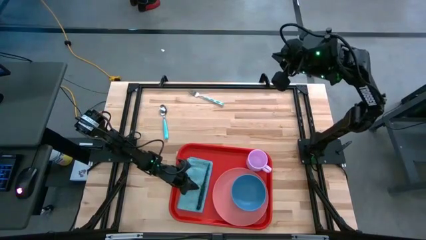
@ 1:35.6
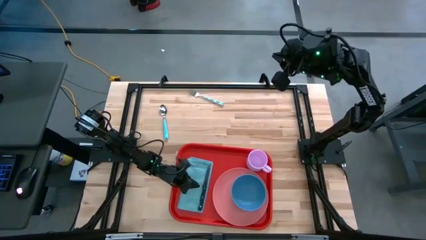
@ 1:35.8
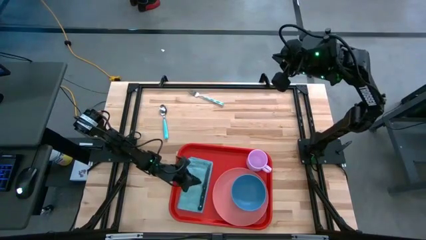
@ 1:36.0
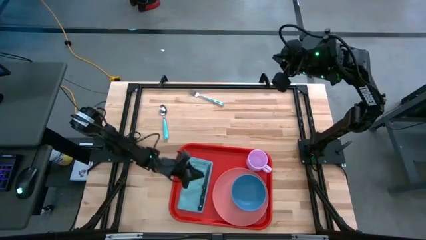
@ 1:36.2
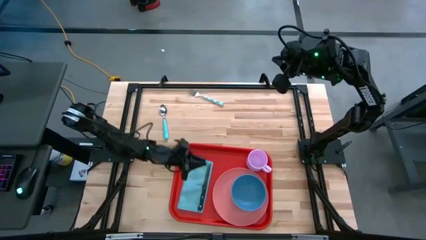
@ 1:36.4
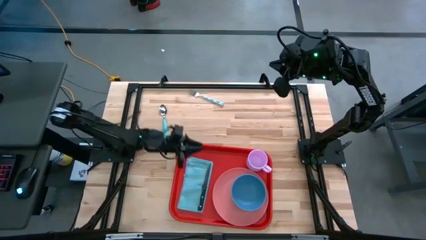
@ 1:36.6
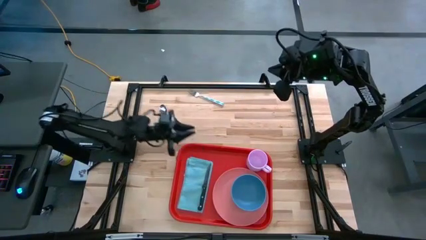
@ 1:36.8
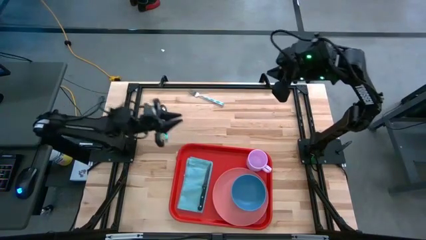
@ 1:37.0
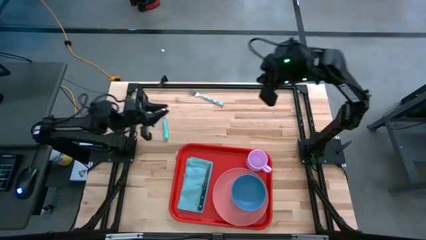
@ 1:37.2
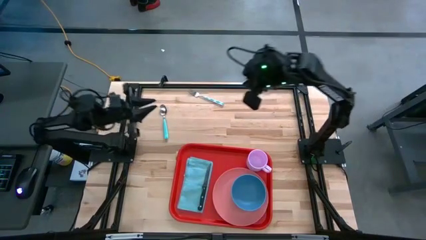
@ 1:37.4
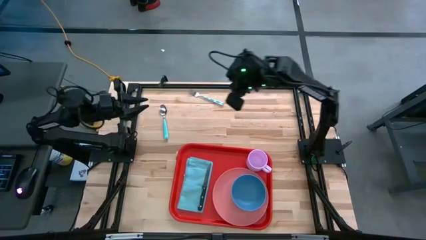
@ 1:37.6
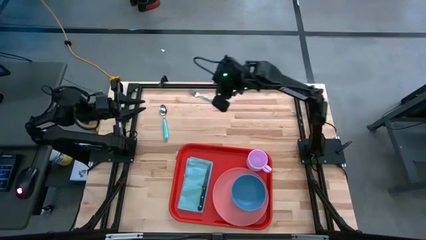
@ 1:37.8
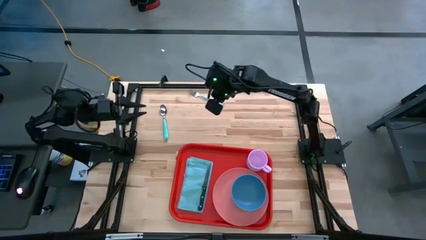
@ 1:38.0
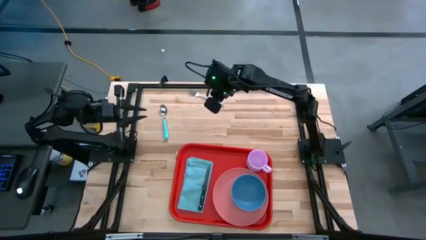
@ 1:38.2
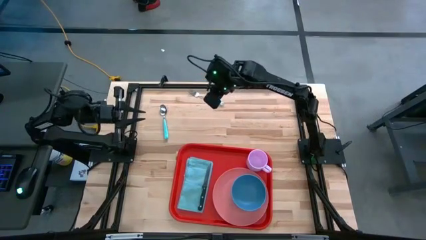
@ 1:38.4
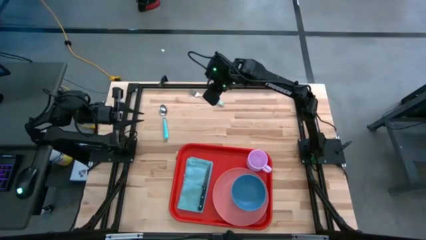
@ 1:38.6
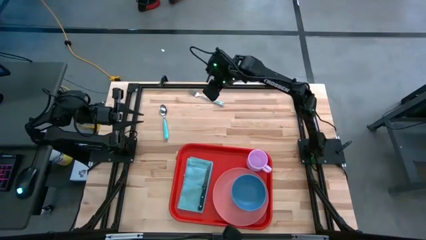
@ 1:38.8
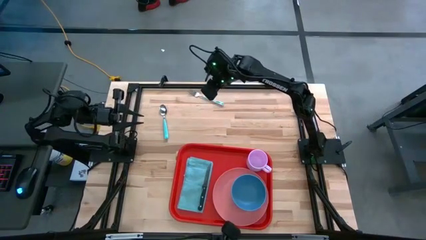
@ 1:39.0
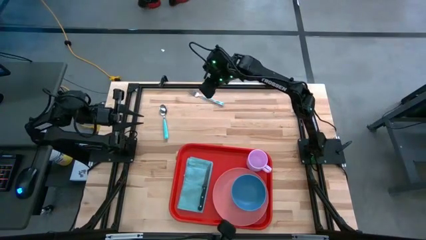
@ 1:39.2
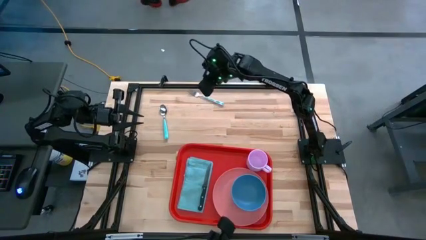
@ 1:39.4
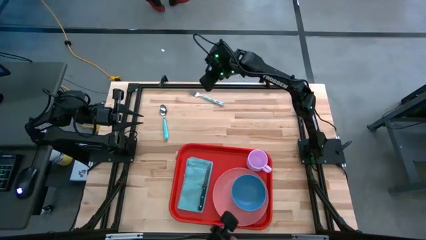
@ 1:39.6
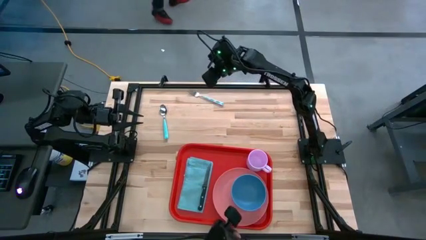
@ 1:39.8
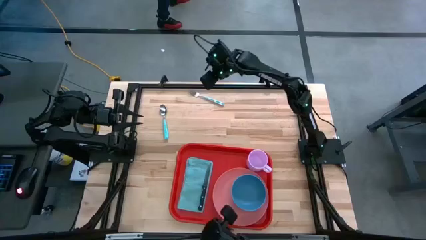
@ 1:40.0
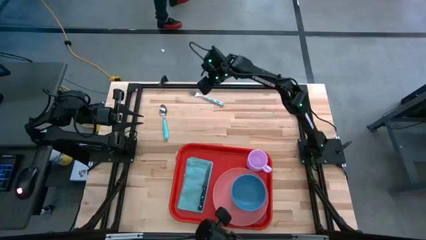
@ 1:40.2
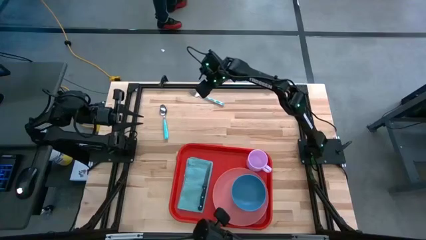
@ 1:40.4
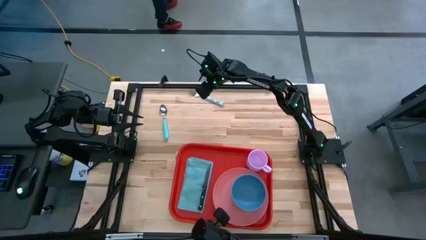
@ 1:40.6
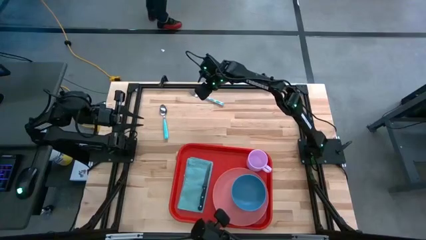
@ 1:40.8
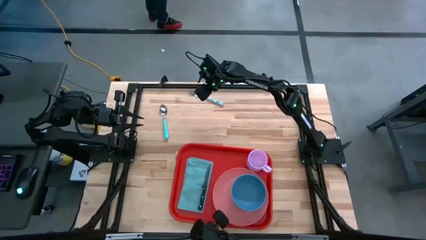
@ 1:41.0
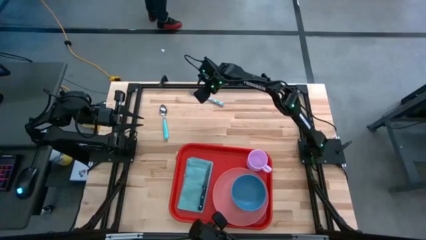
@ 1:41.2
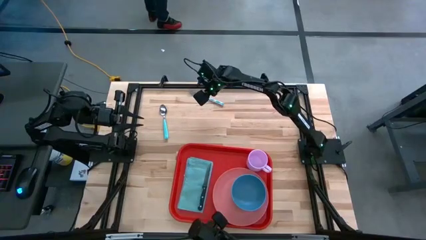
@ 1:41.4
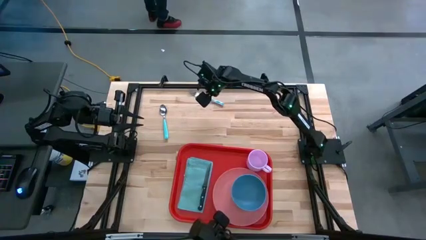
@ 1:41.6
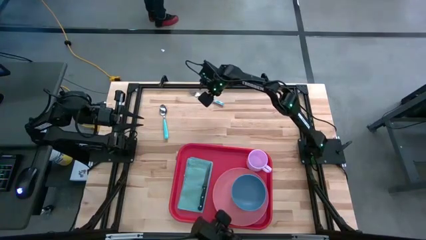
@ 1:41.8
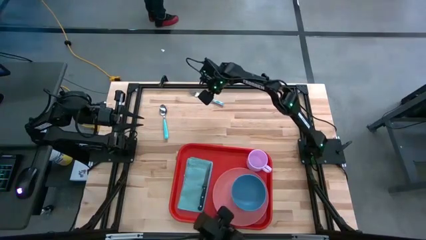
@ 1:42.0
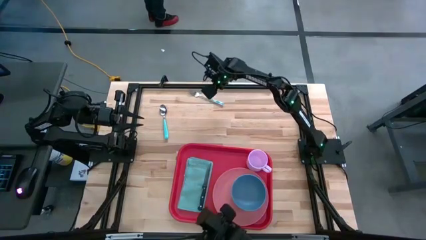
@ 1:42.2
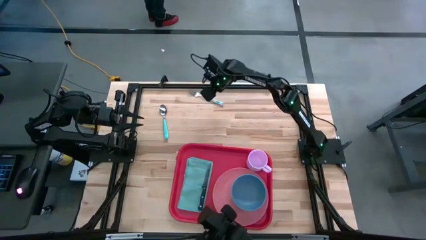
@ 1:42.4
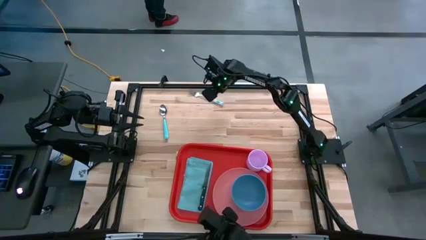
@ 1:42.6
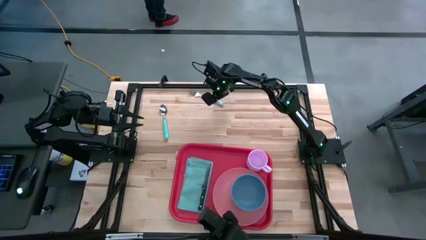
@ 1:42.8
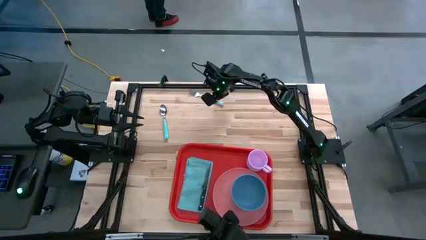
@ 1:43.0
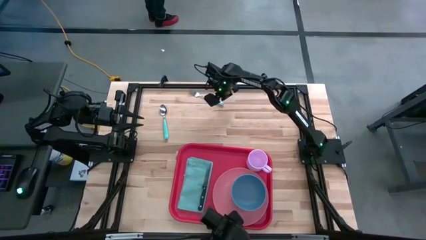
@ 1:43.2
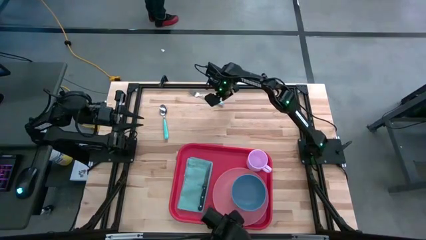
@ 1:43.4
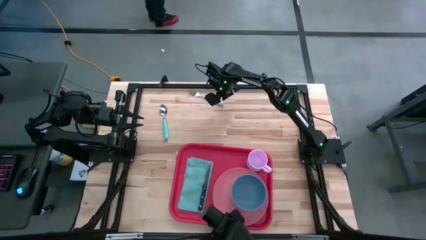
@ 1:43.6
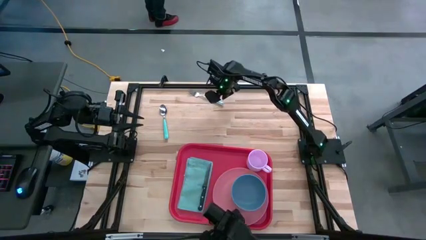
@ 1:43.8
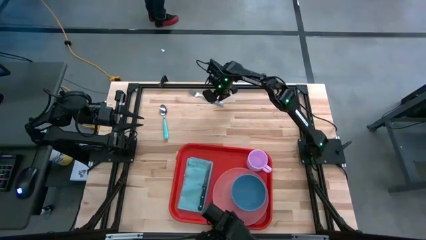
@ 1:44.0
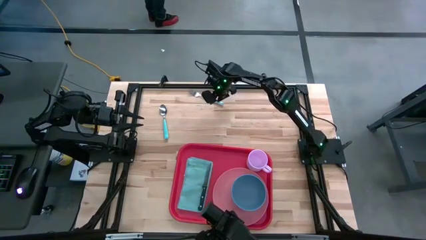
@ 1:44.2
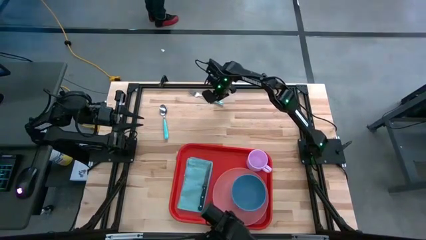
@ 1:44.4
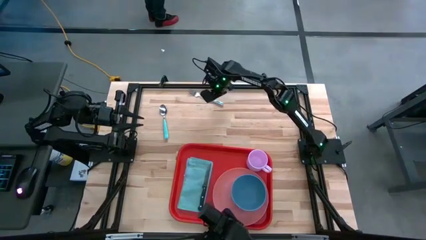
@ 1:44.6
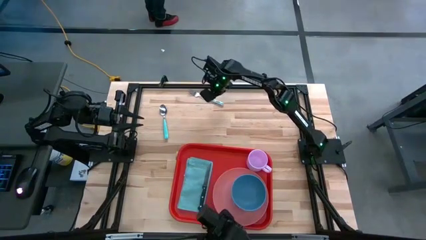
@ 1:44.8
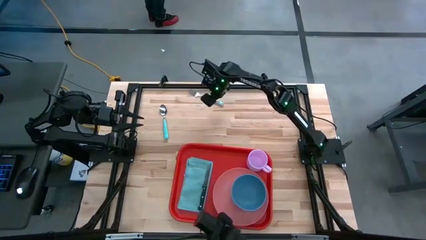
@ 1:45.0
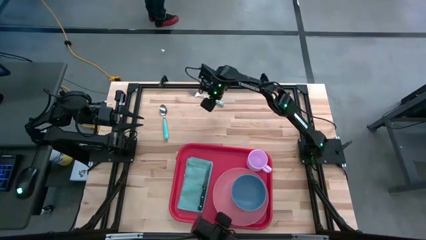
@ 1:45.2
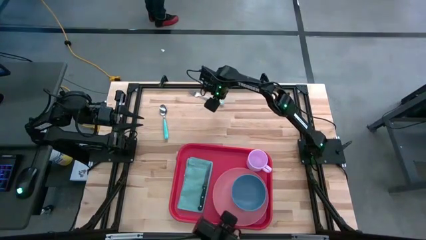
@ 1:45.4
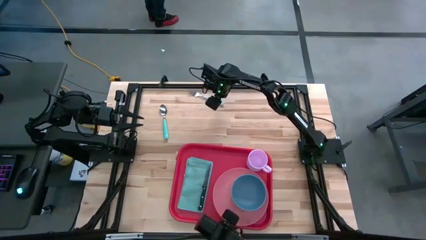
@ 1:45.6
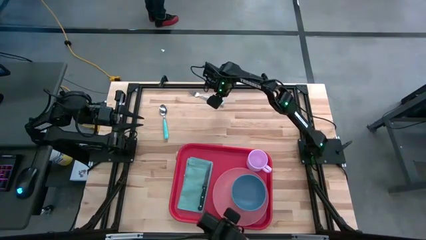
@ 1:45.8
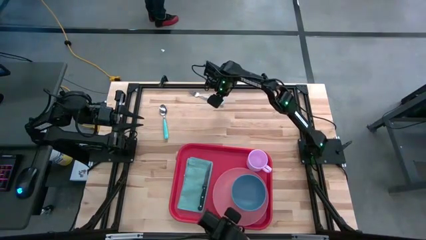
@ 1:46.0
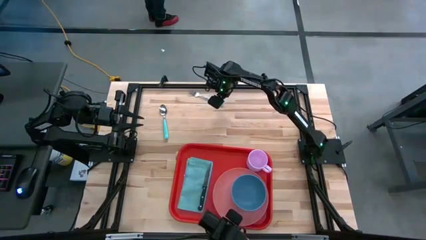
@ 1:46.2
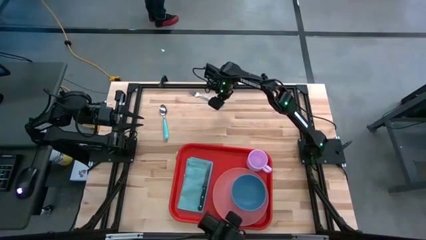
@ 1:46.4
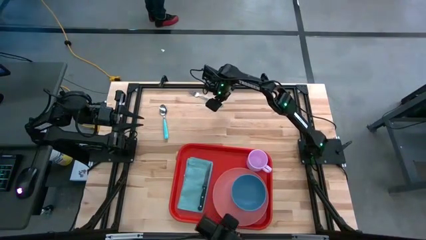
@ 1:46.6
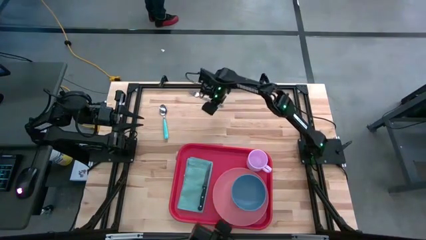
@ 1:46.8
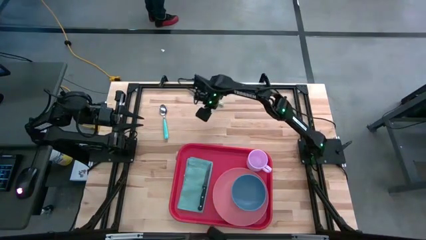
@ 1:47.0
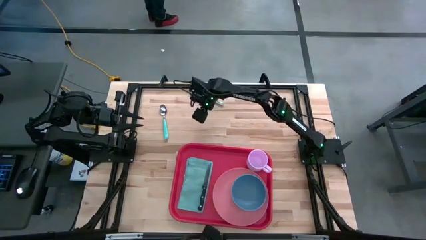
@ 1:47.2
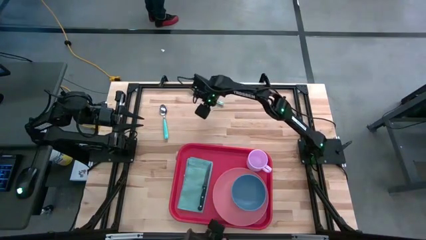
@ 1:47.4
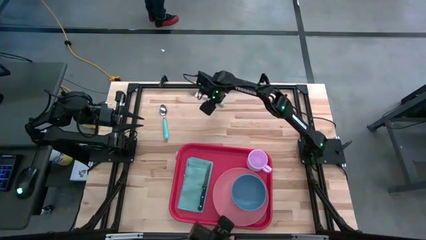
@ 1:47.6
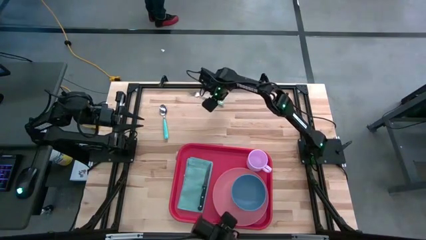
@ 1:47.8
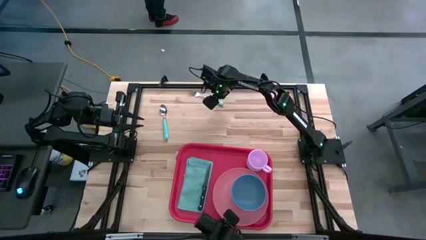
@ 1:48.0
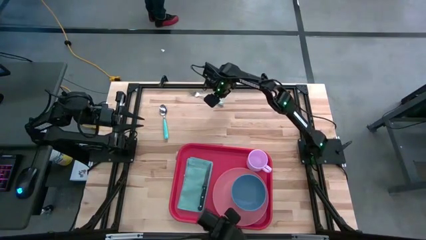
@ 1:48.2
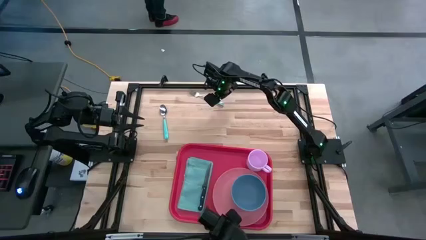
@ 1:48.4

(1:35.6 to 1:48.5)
Task: Set up tray
Put the blue fork on the blue table napkin to the left of the black table knife

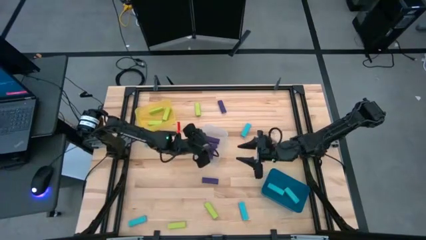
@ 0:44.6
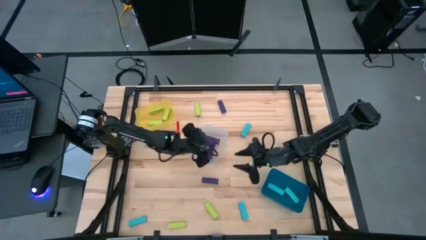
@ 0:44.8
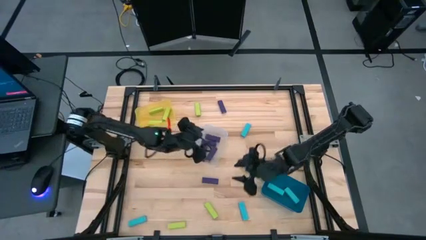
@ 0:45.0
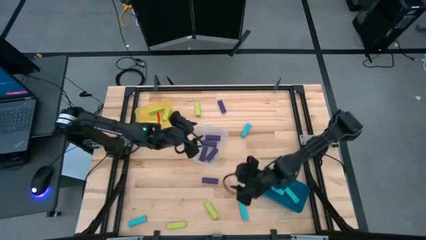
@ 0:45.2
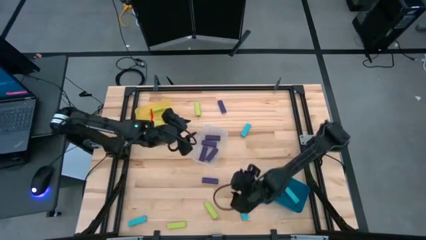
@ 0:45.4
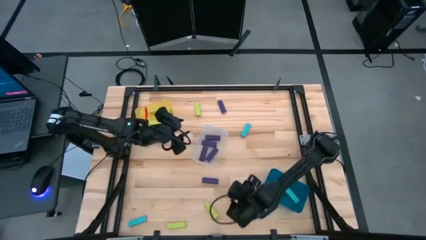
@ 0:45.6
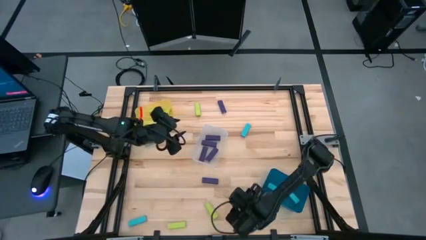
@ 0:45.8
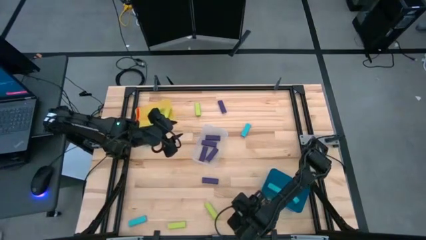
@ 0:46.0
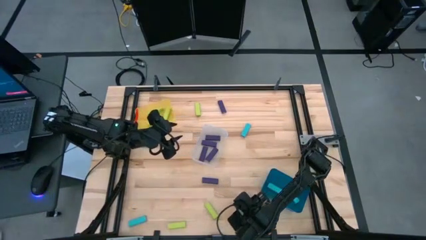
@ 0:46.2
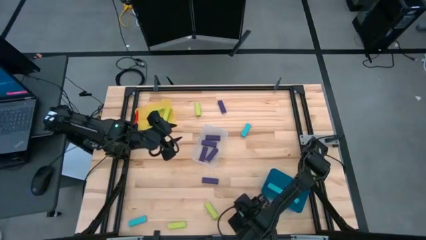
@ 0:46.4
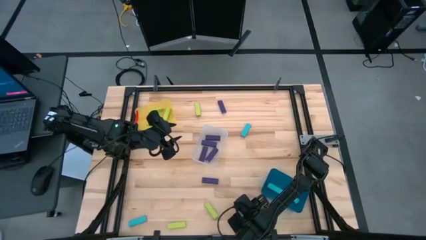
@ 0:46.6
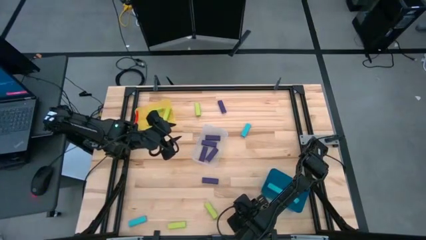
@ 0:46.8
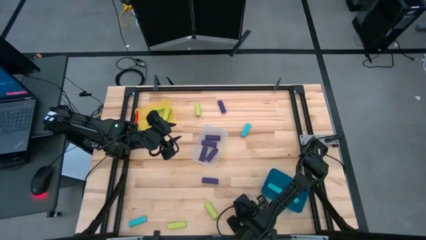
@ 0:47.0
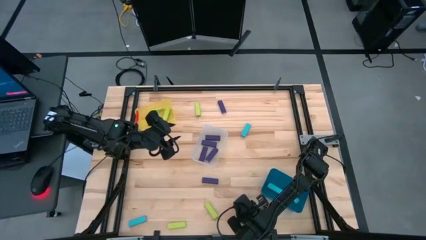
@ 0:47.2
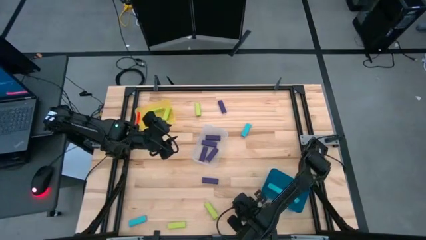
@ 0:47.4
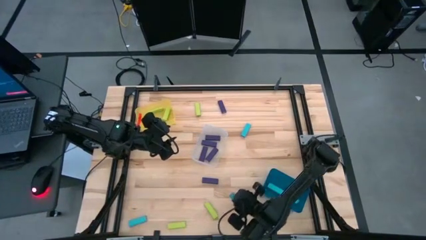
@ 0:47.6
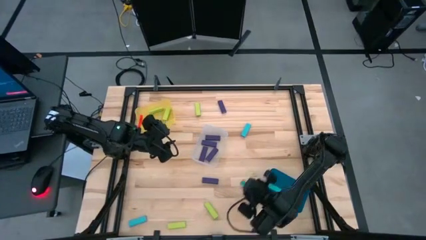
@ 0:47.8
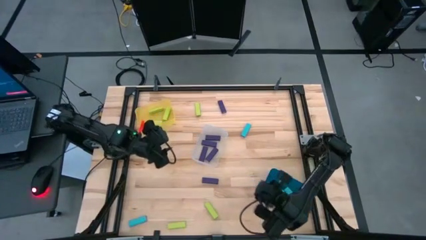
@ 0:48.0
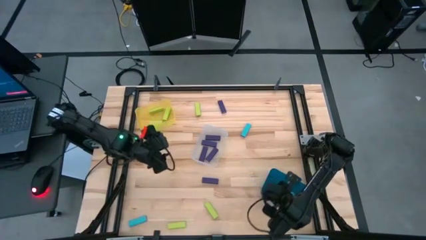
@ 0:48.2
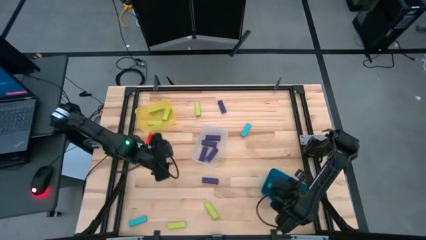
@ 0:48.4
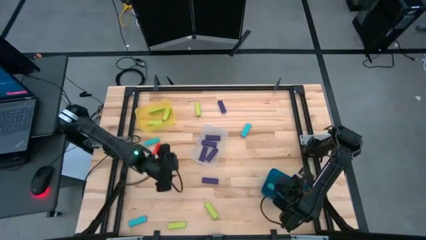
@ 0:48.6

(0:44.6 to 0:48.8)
Task: Sort blocks
Put the bottom right blue block into the blue bin
